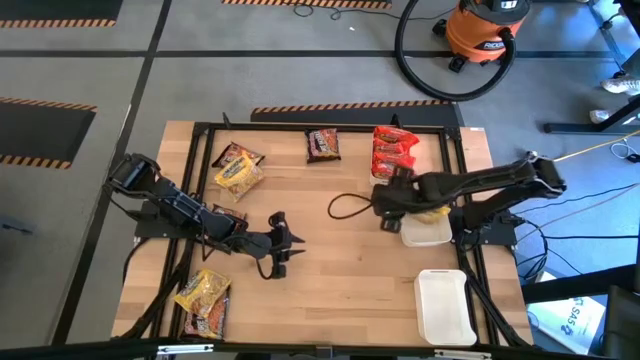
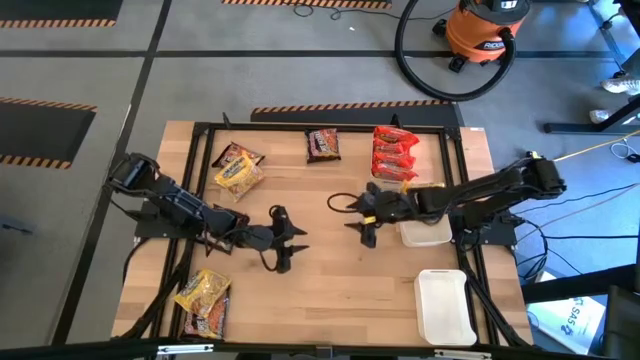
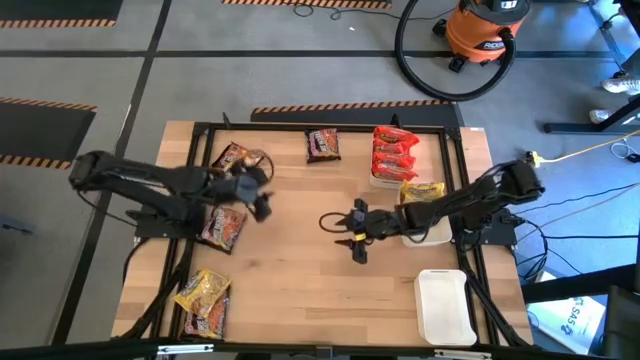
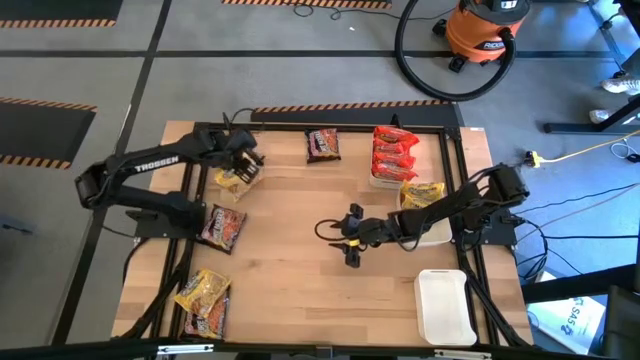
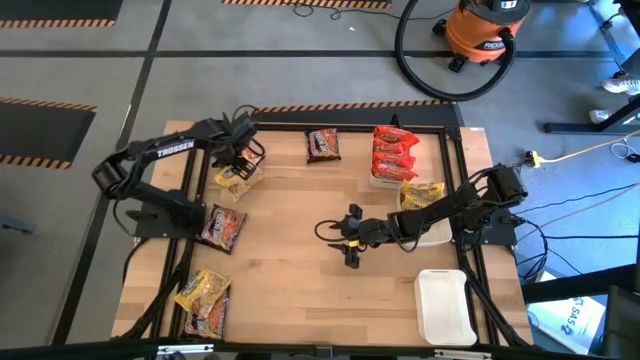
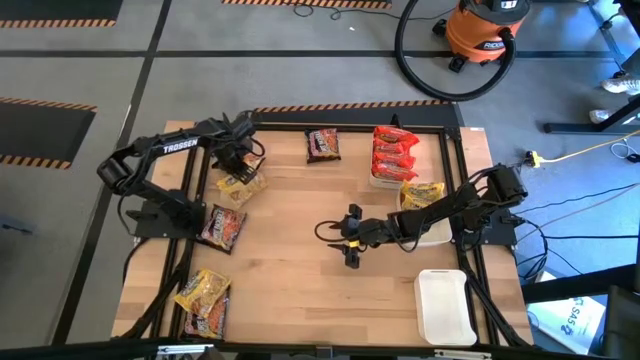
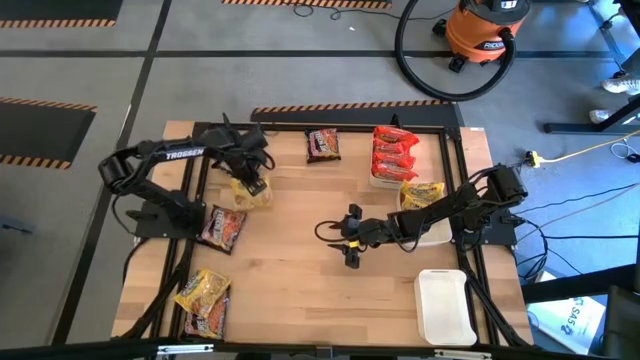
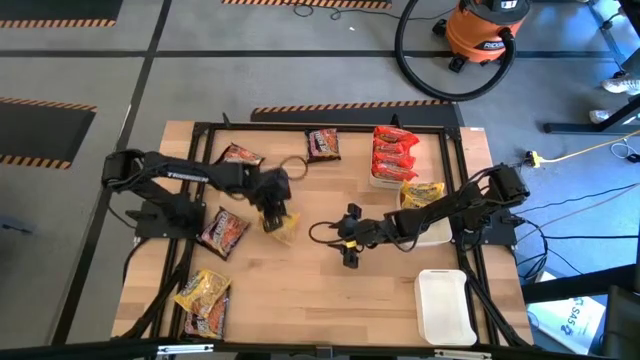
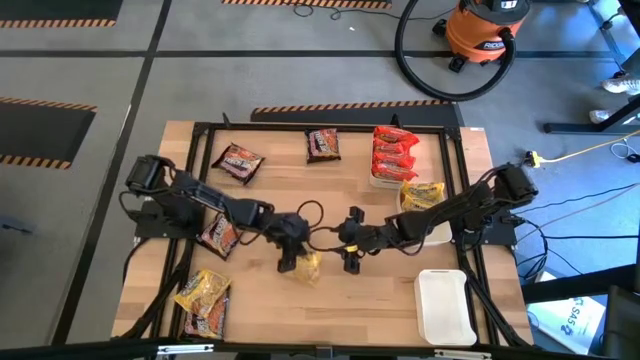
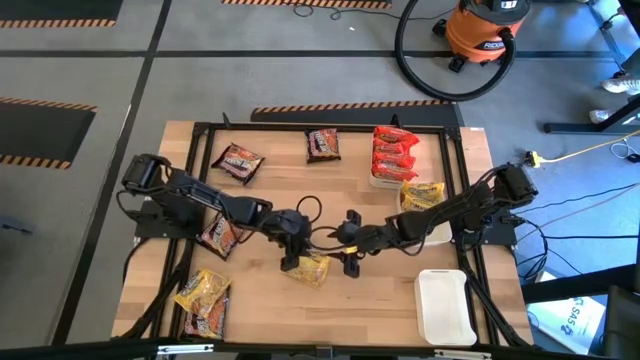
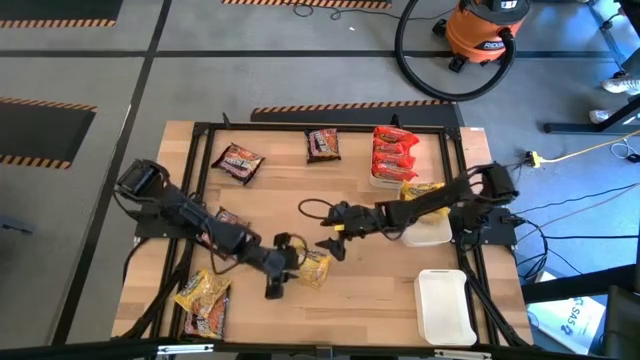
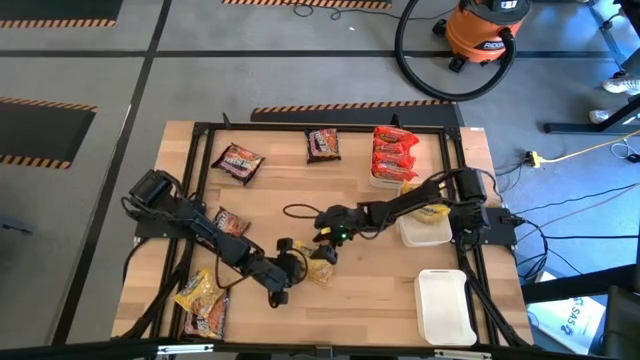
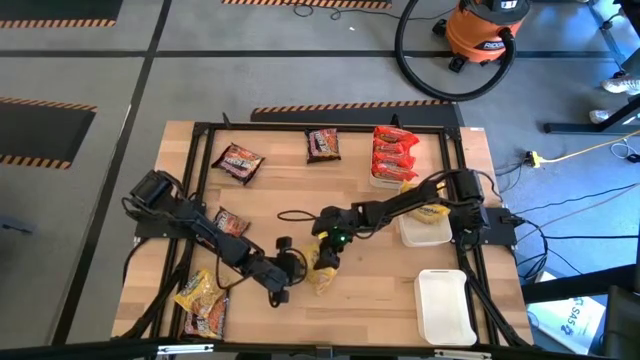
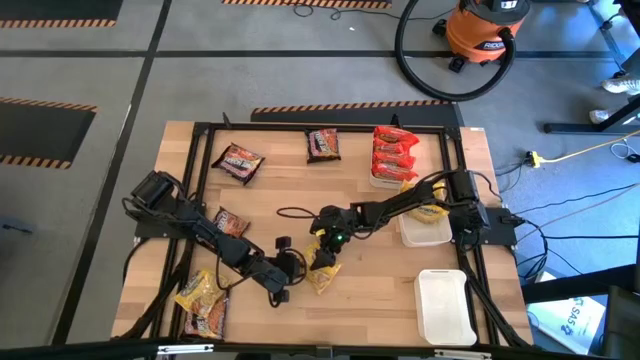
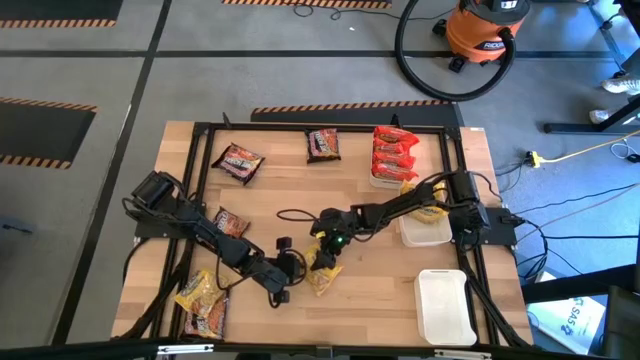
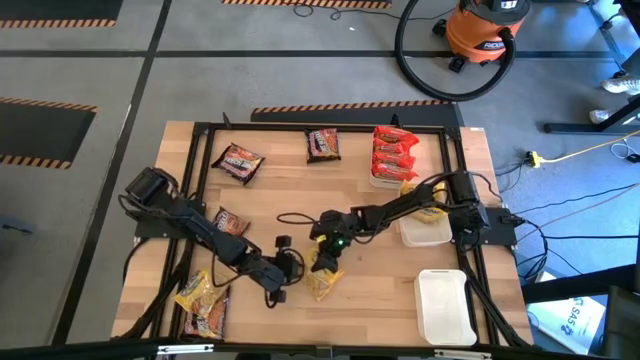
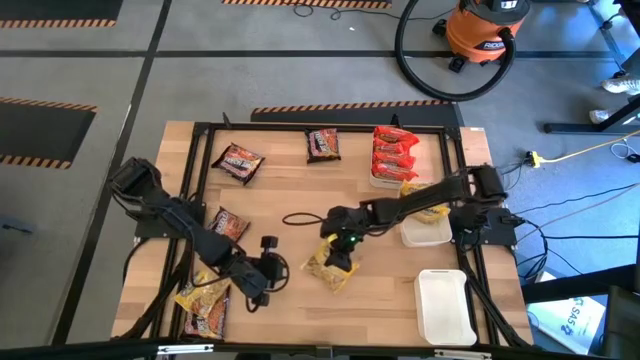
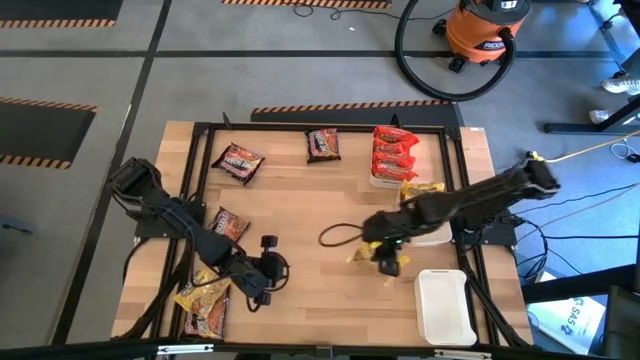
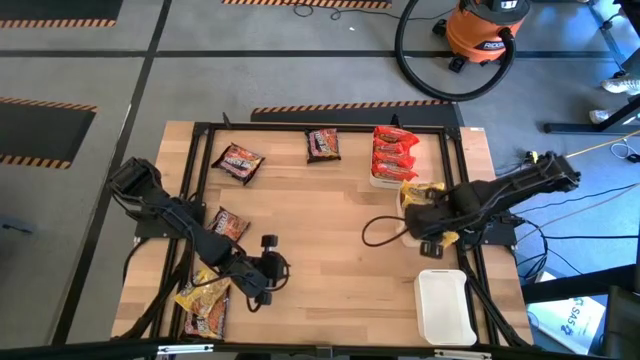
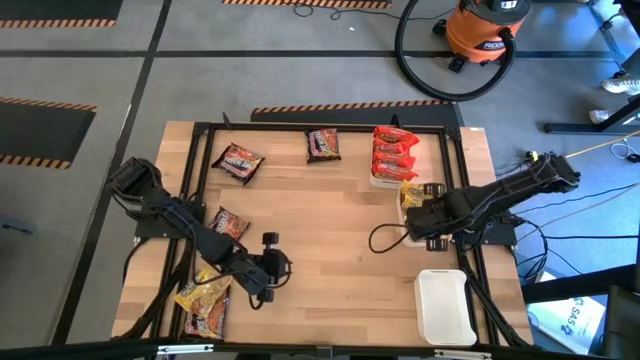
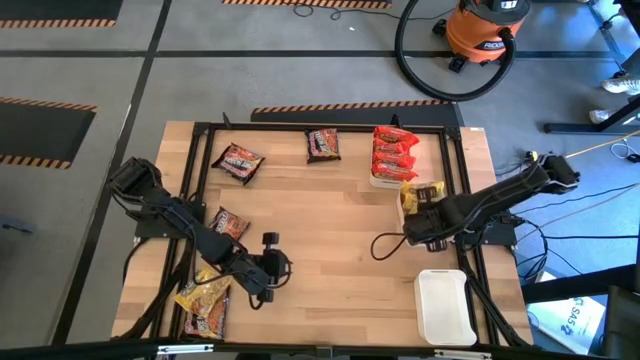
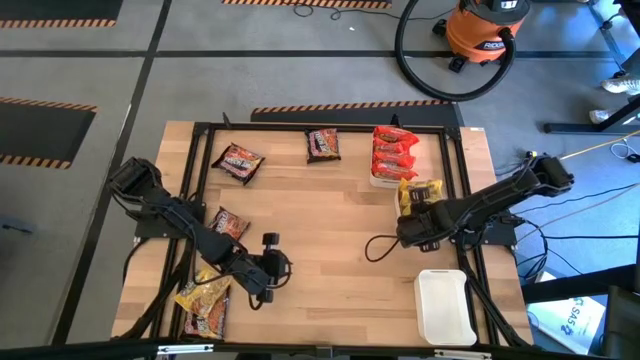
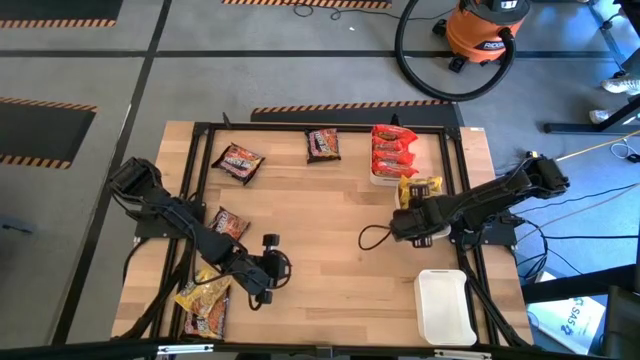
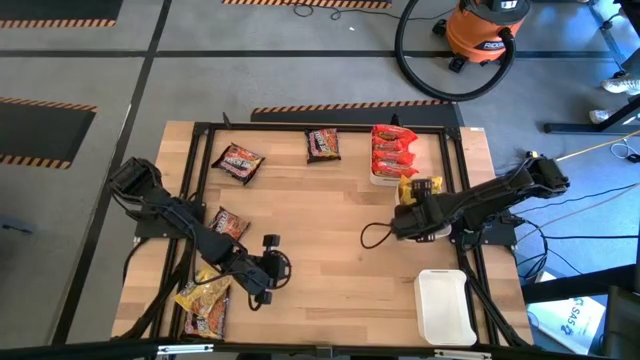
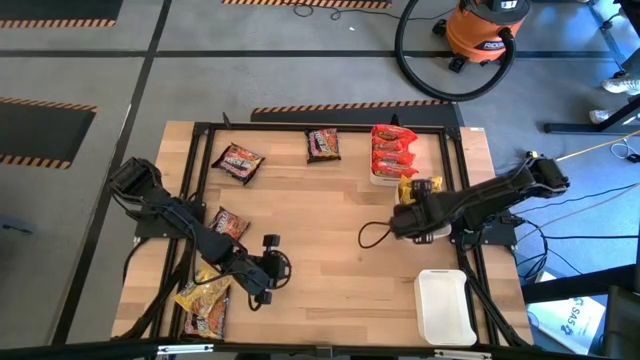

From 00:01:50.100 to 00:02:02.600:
Task: Sort Maruchan noodles
Put the yellow noodle pack into the middle white bin

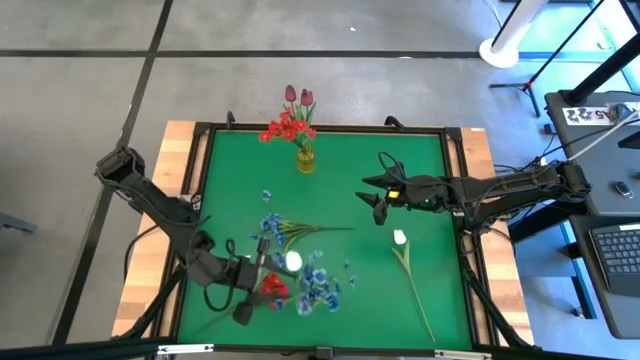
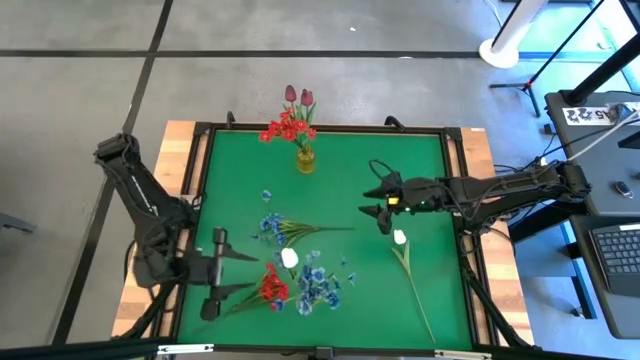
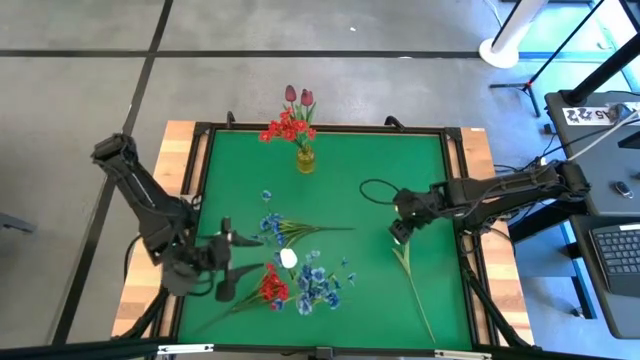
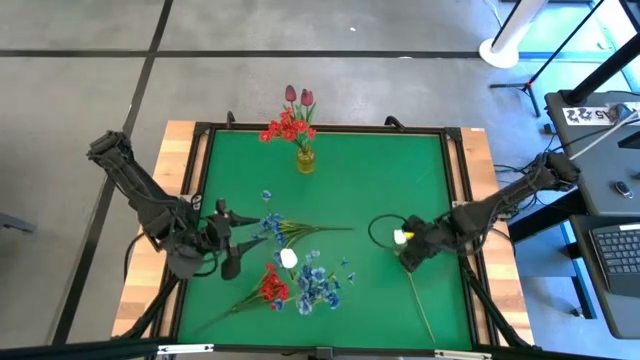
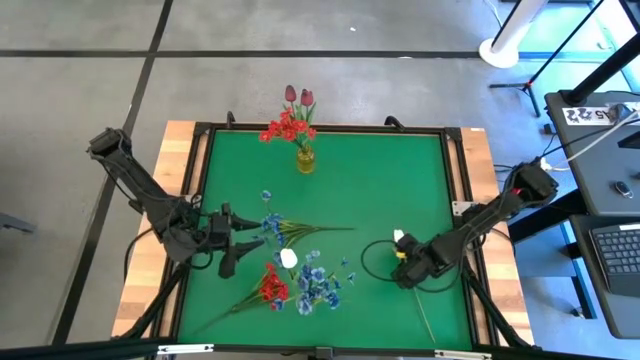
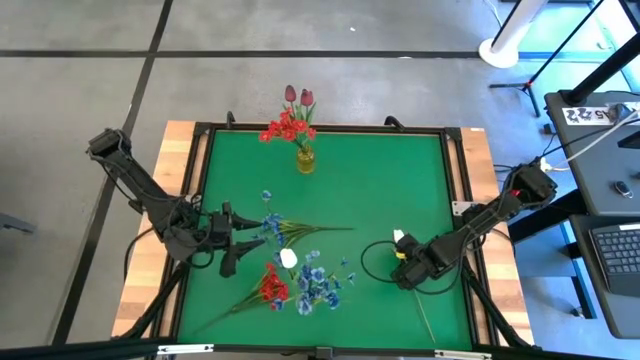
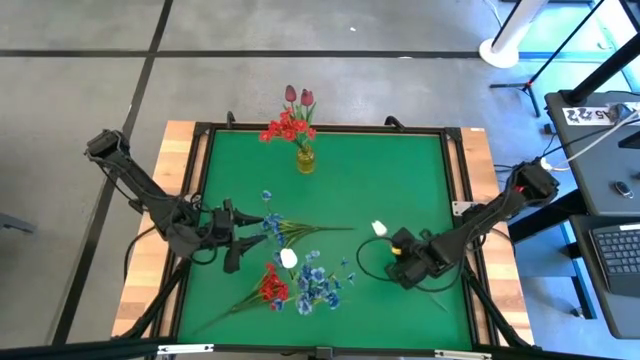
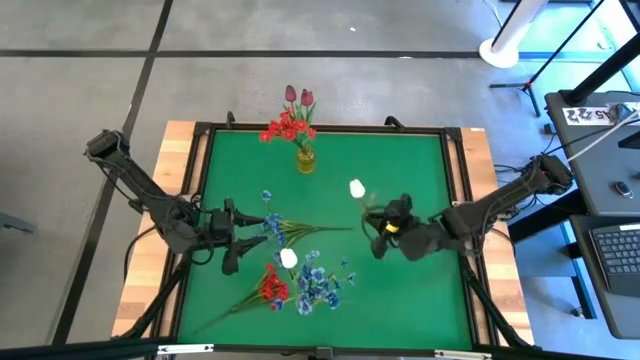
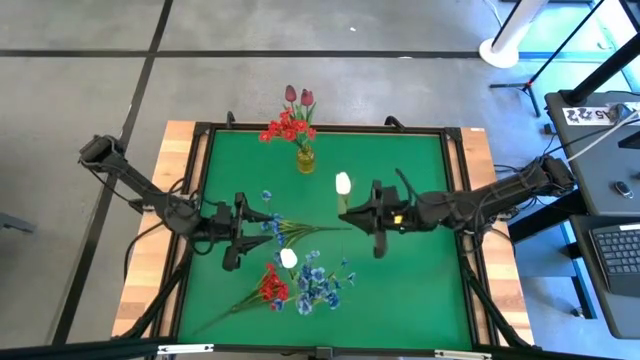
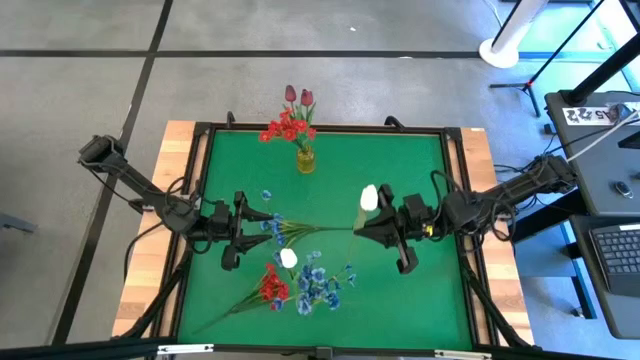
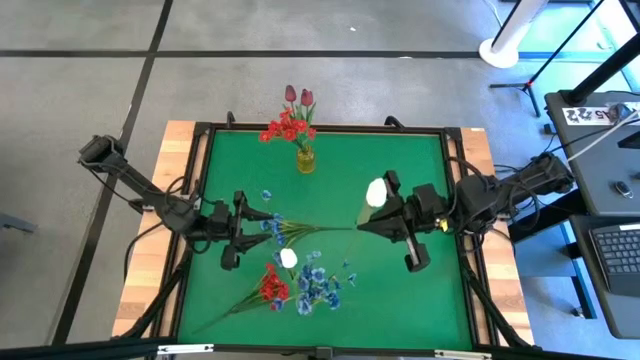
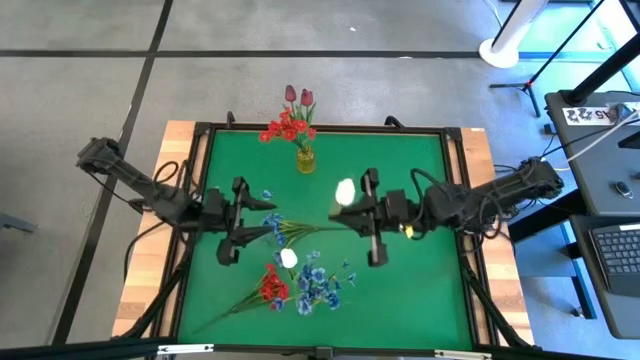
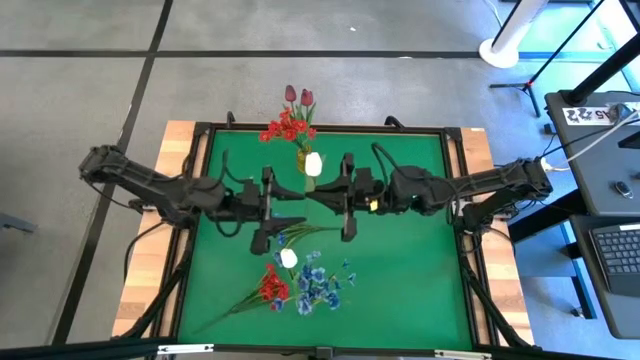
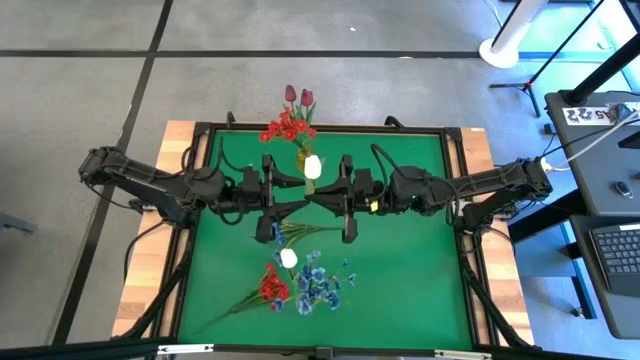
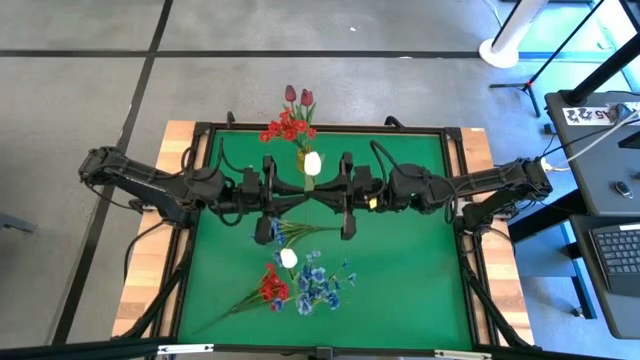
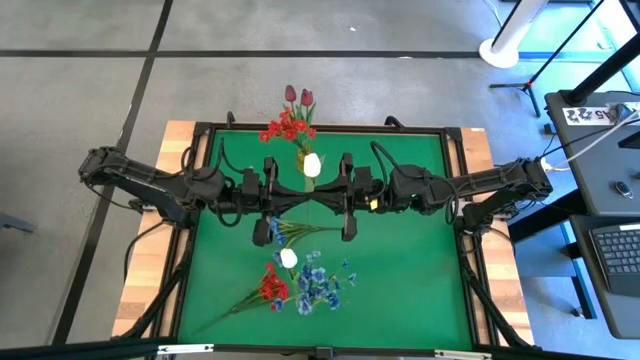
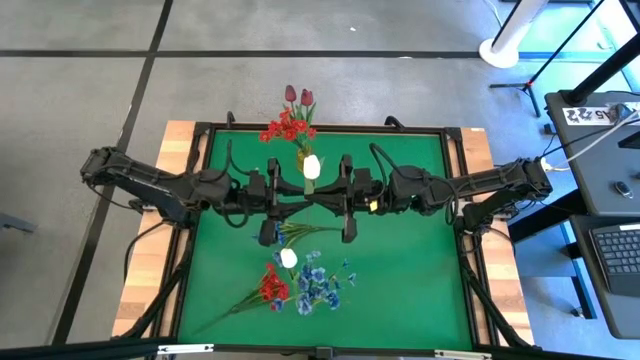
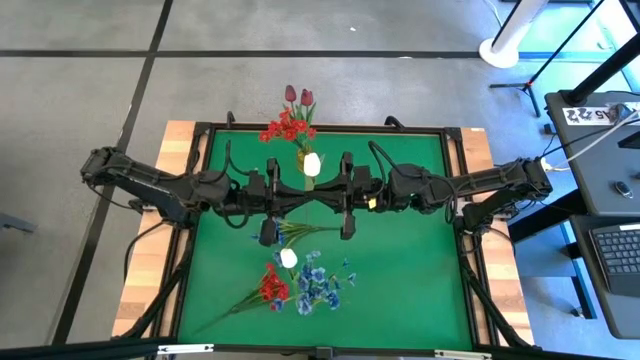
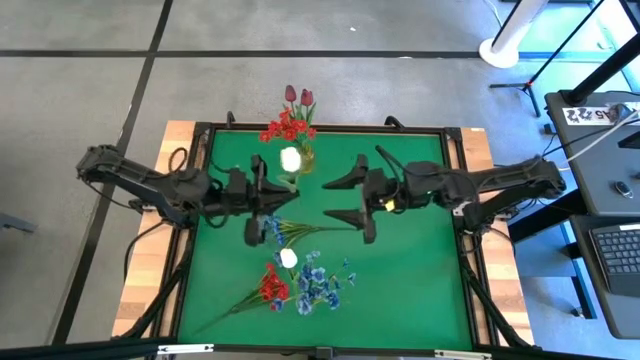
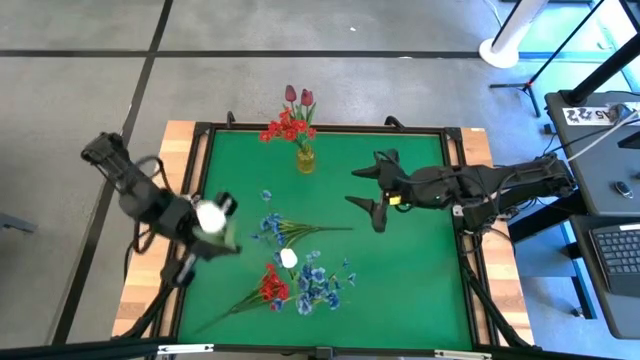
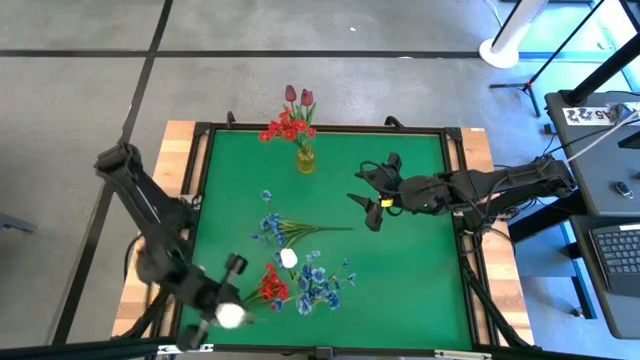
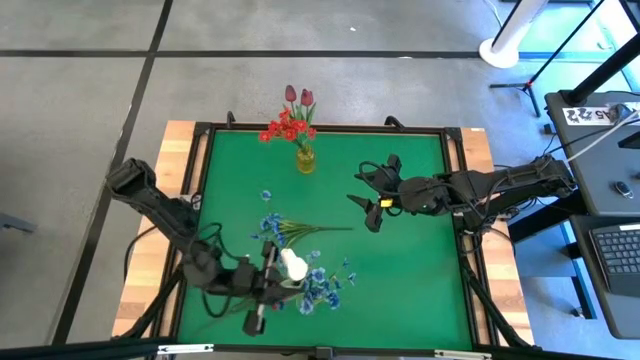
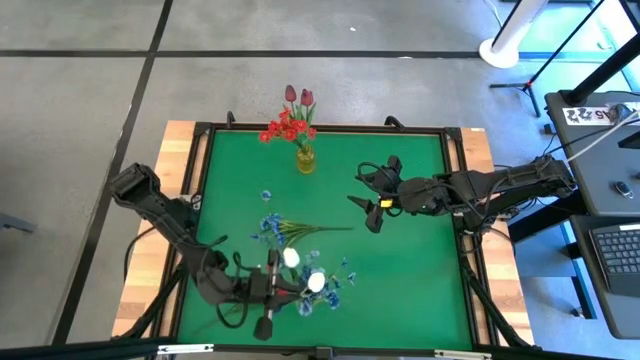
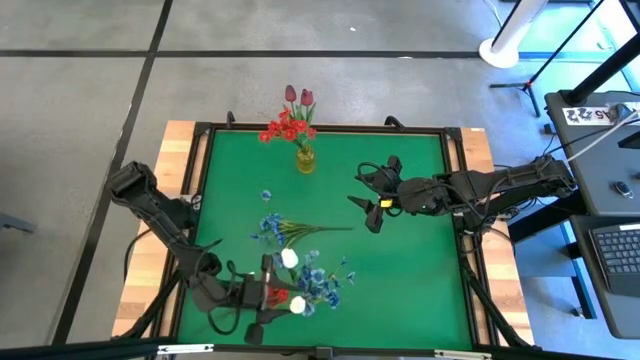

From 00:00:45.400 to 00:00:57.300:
Task: Sort flowers into vase by color
Put the white tulip into the transparent vase
